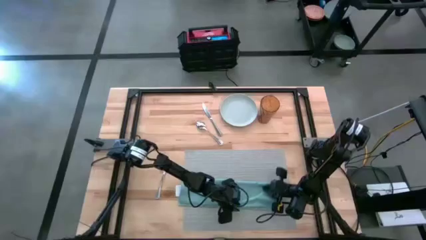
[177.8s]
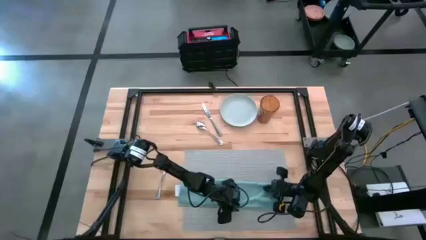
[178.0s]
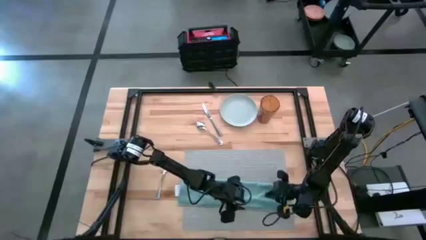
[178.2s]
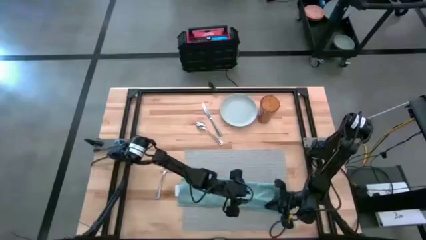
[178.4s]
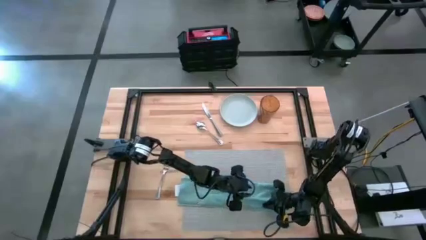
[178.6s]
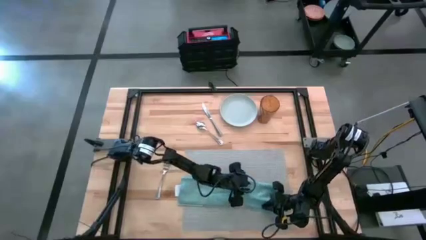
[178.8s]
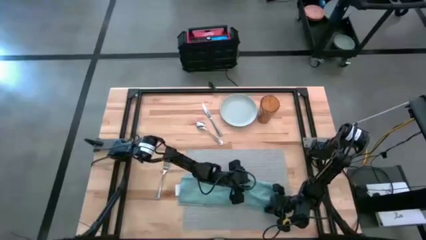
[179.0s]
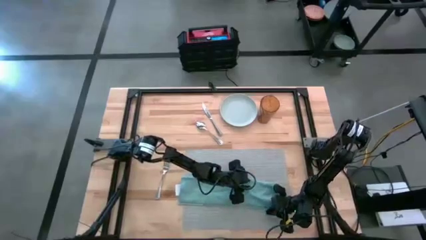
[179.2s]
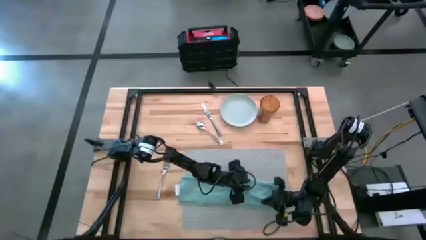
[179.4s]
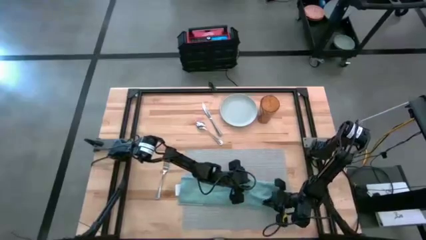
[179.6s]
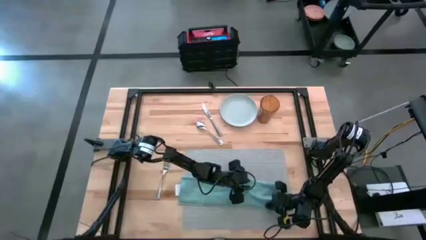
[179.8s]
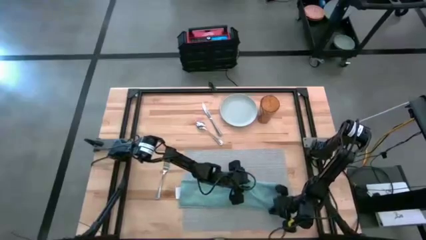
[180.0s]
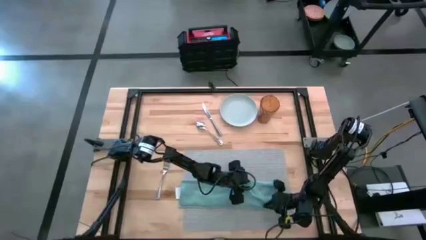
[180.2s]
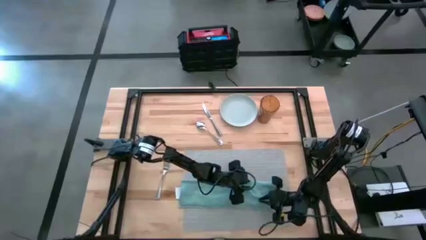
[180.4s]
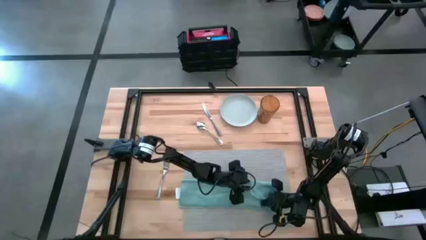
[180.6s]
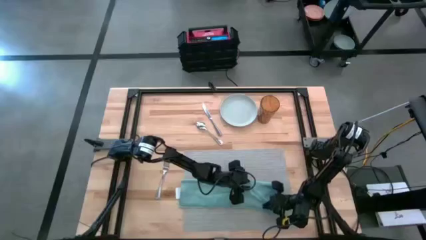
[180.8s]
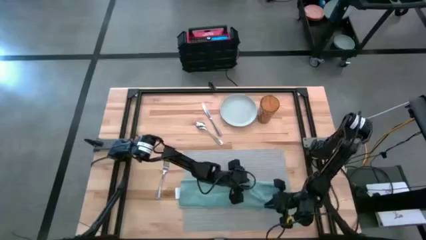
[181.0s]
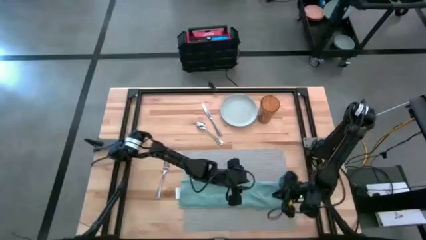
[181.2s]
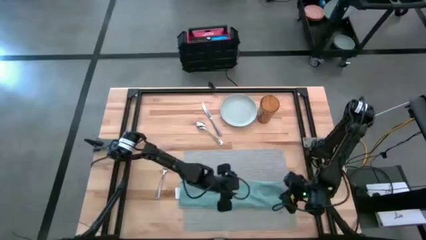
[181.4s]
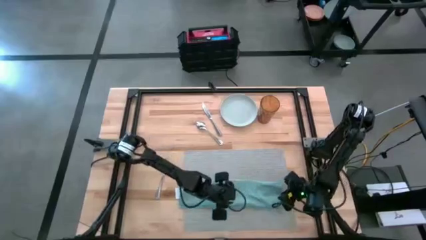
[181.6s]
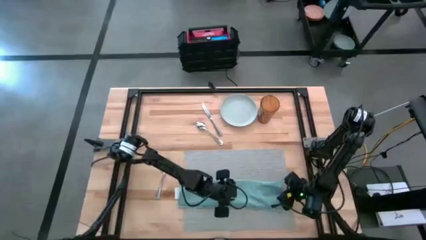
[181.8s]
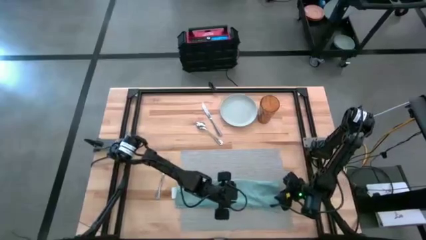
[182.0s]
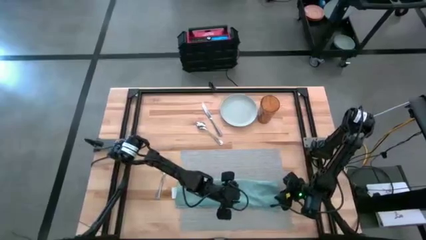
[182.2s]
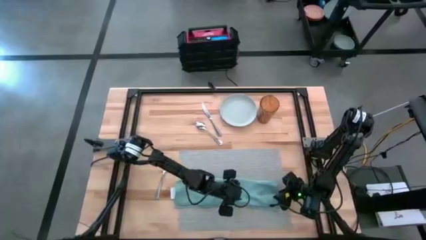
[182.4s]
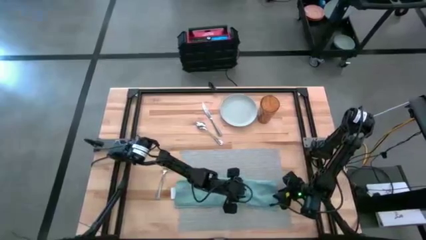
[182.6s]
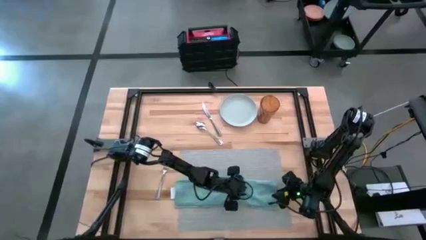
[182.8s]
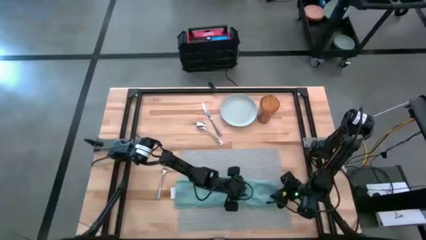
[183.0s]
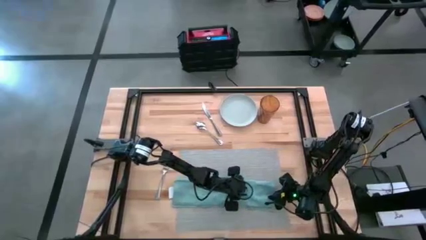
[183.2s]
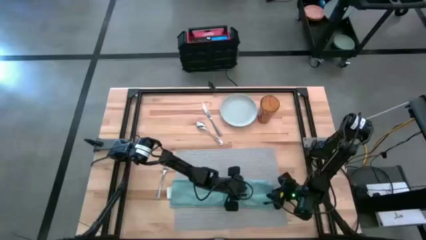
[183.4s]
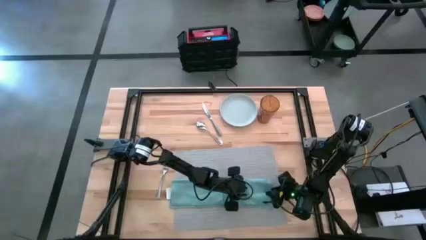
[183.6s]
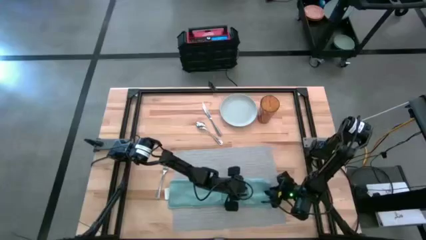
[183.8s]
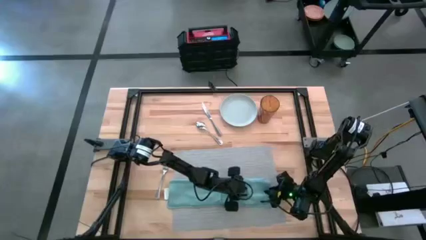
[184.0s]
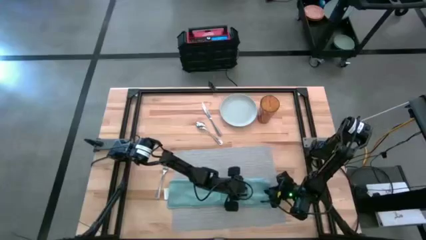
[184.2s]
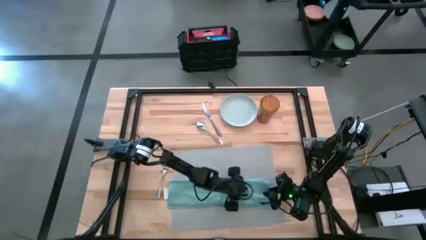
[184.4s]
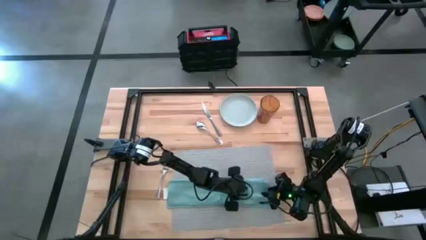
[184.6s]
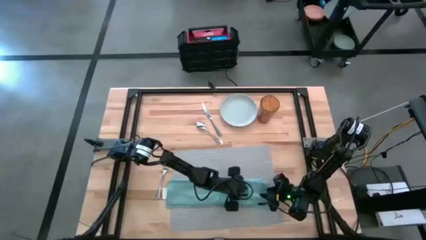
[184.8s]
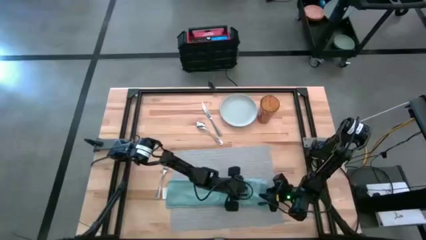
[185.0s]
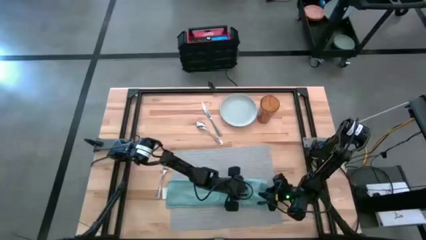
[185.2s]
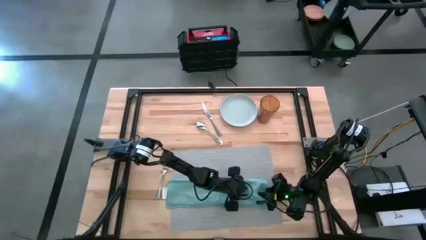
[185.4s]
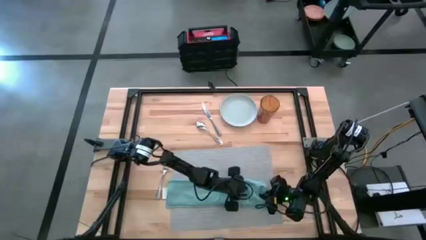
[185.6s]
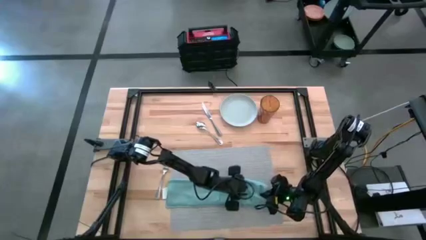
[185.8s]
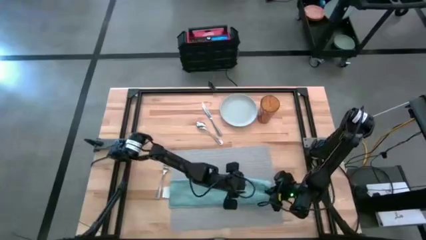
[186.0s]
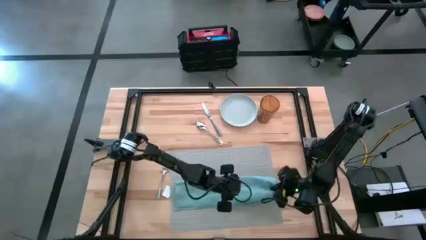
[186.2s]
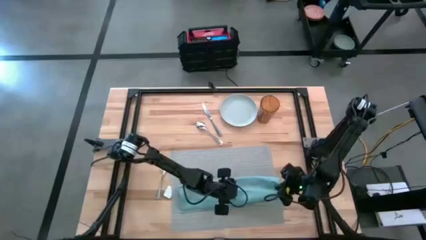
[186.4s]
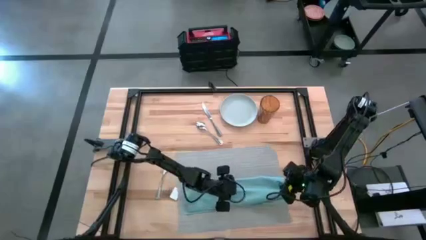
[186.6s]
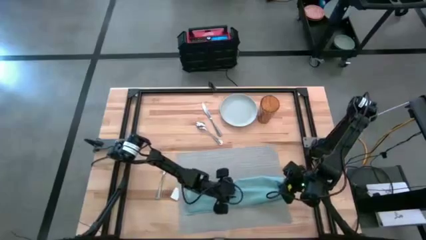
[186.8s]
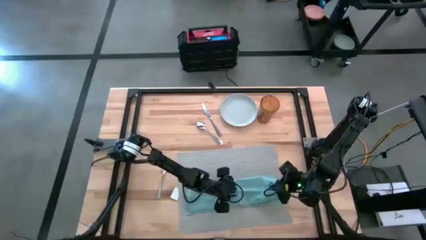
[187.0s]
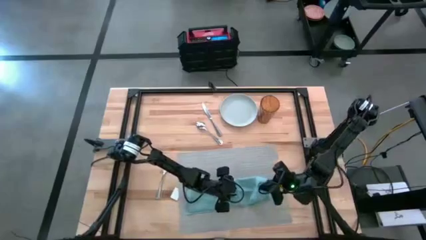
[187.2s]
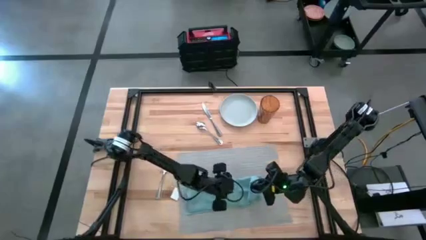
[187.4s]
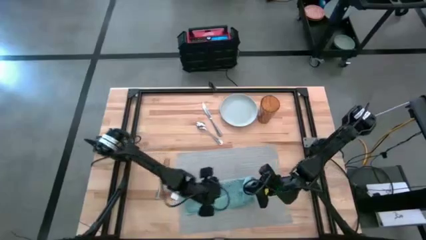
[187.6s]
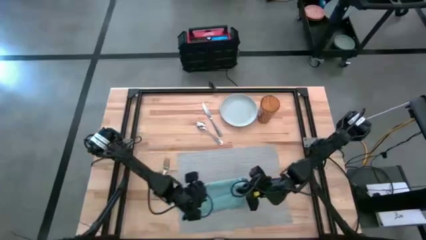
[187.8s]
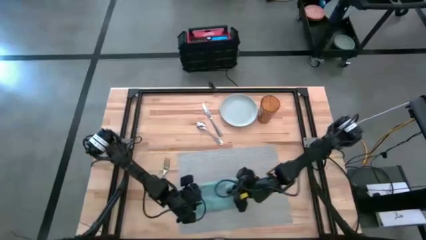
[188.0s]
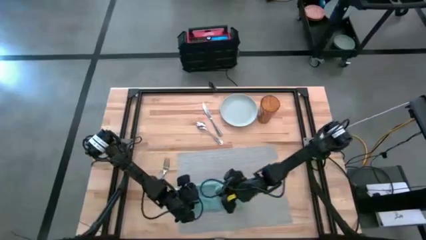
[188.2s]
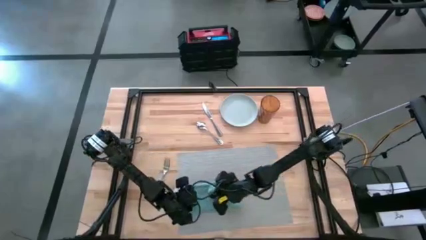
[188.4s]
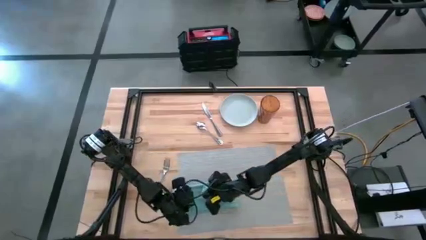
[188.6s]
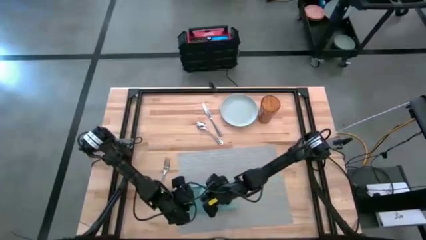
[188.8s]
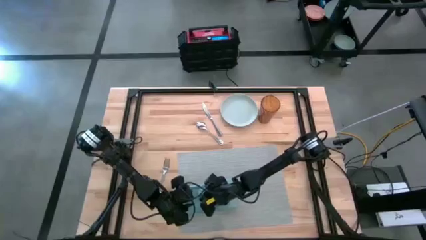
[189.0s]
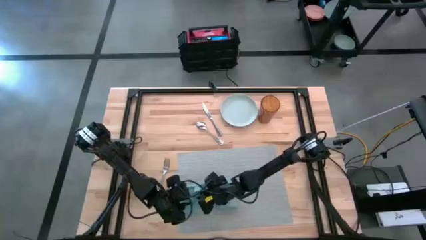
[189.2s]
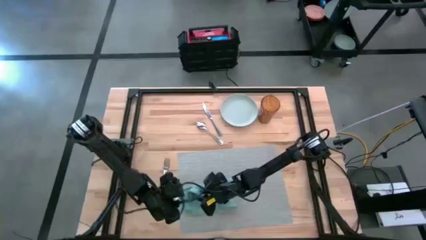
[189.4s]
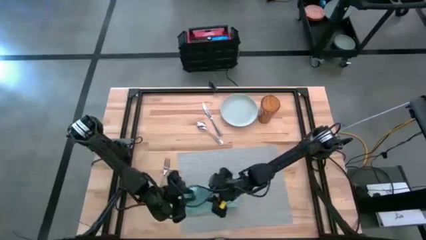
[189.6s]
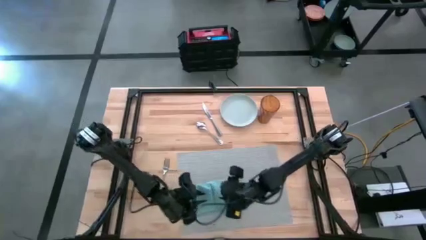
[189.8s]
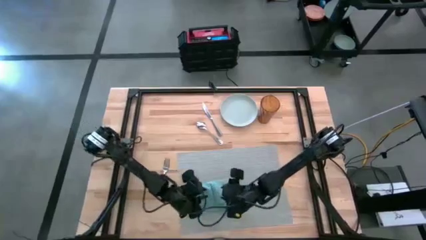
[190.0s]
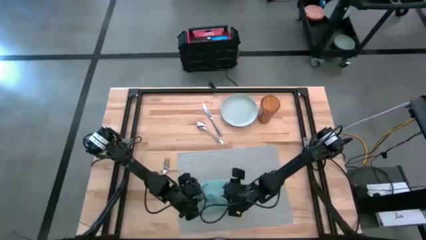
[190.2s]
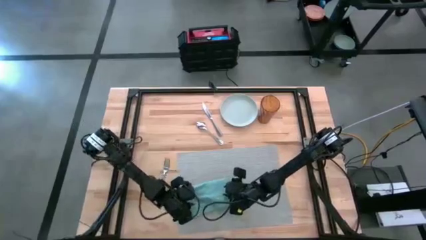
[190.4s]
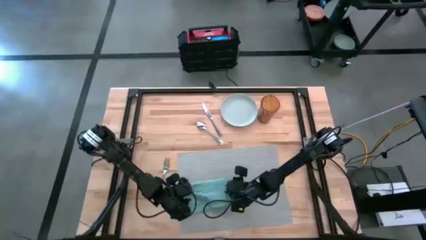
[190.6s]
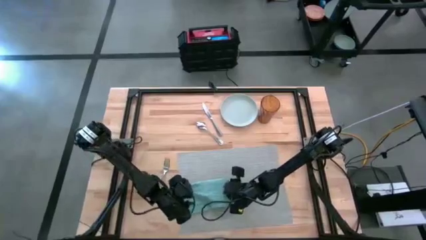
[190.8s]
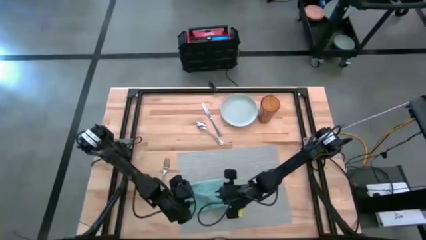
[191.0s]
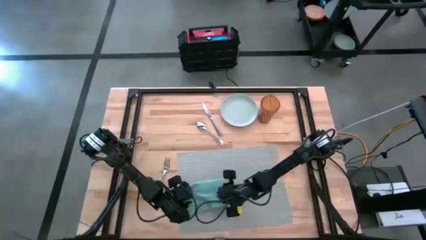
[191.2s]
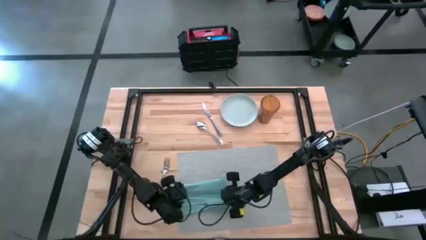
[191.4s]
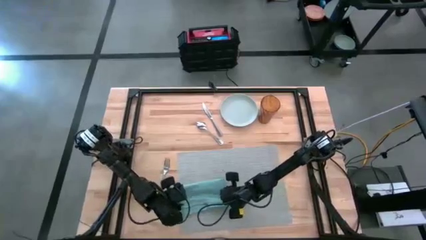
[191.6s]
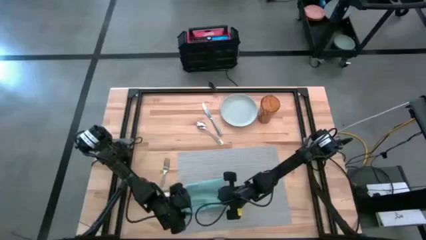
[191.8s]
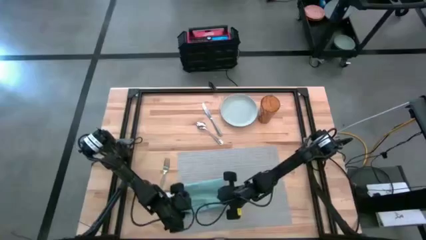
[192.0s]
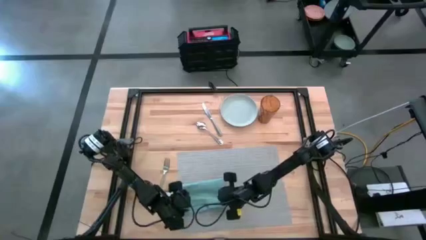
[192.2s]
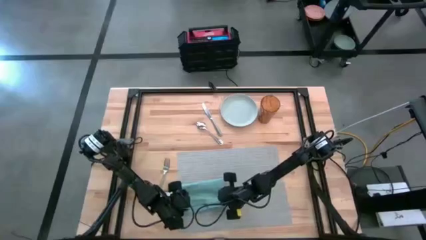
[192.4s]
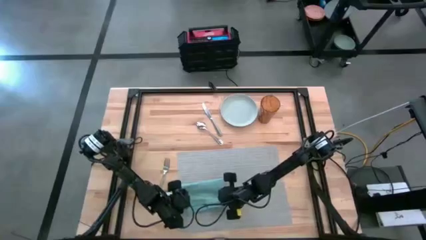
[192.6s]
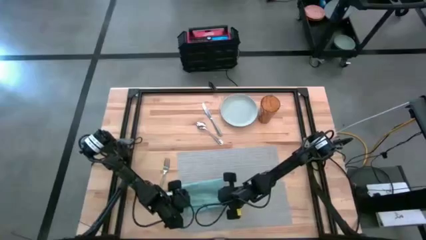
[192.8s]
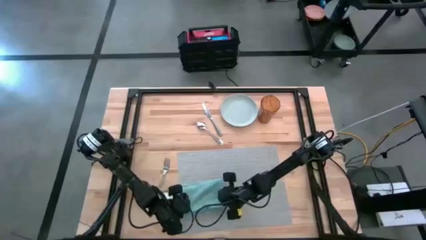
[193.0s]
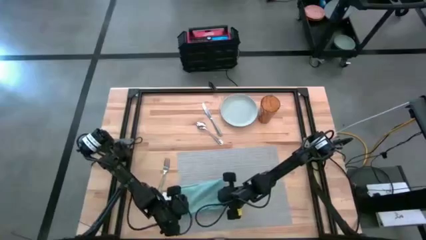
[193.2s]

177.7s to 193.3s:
Task: Set table place
Fold the blue napkin on the gray placemat
